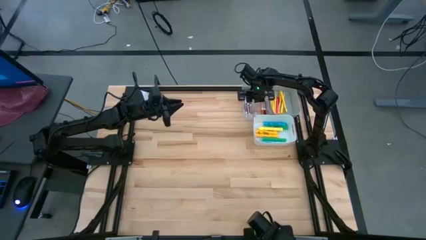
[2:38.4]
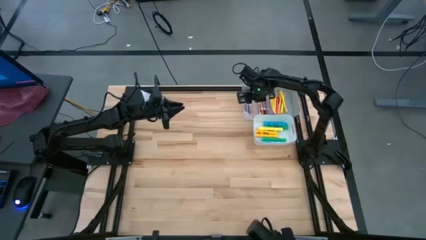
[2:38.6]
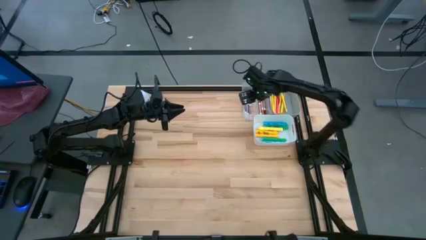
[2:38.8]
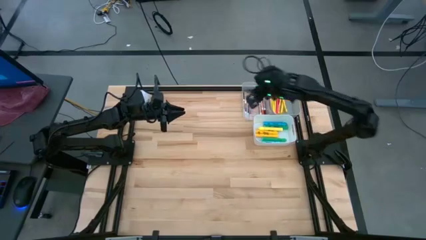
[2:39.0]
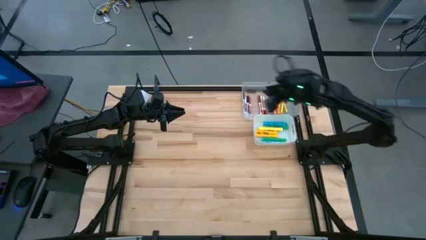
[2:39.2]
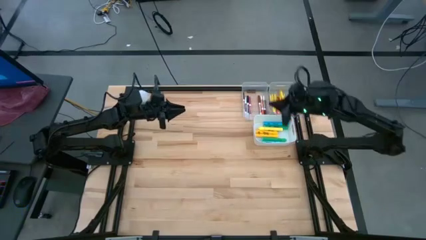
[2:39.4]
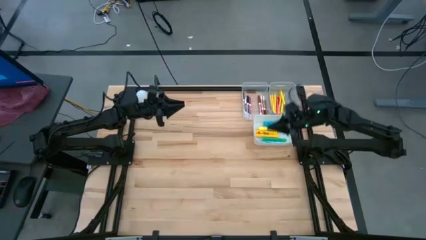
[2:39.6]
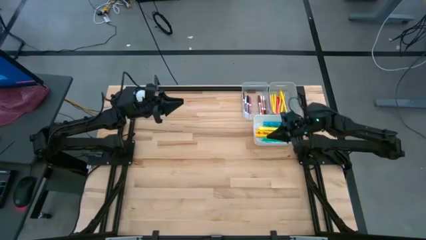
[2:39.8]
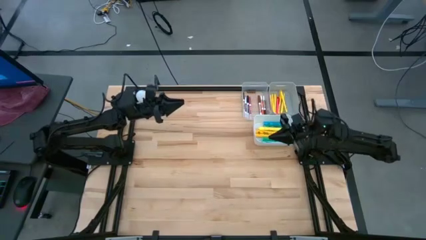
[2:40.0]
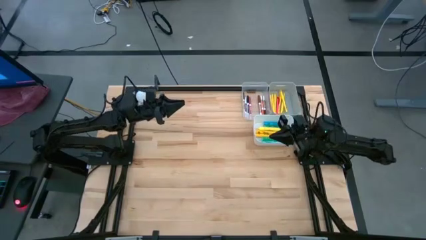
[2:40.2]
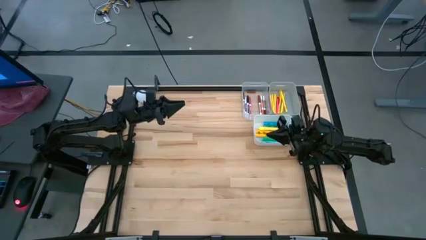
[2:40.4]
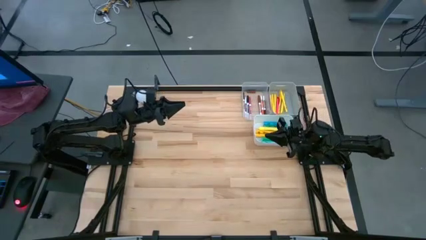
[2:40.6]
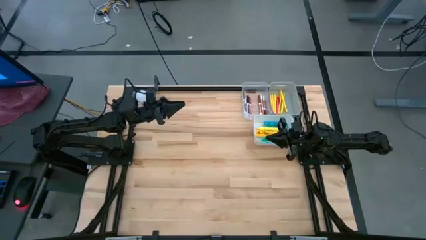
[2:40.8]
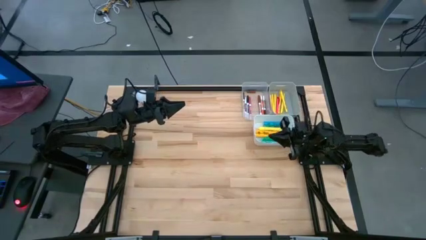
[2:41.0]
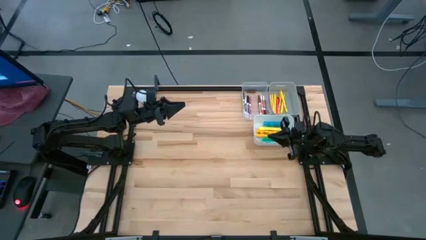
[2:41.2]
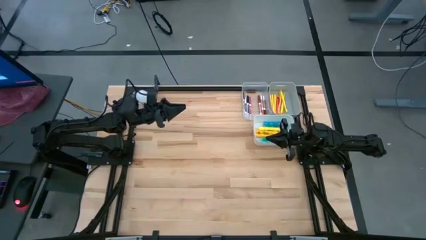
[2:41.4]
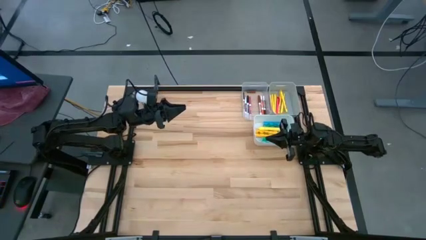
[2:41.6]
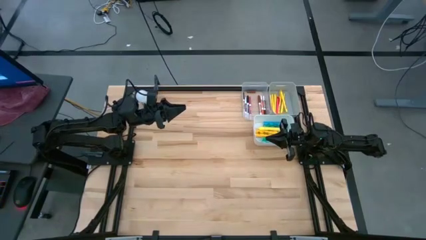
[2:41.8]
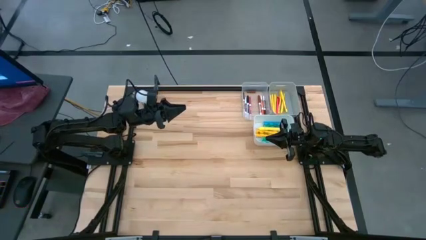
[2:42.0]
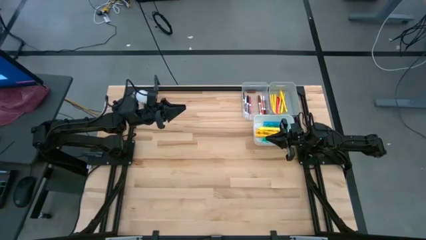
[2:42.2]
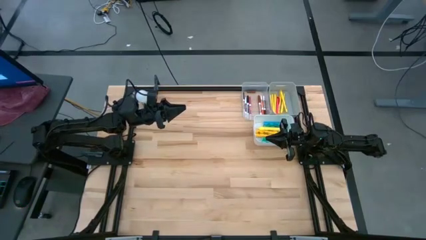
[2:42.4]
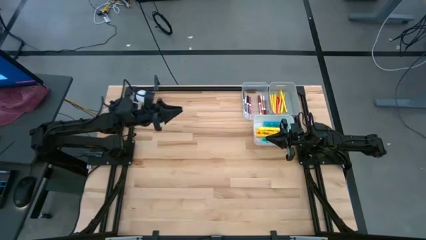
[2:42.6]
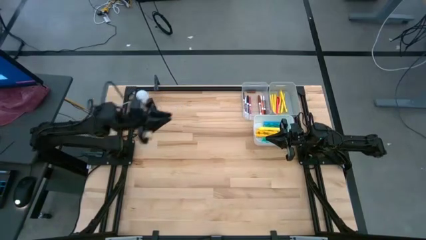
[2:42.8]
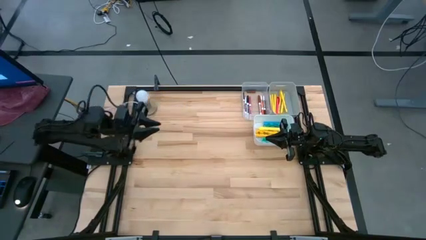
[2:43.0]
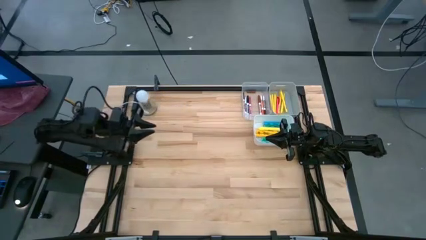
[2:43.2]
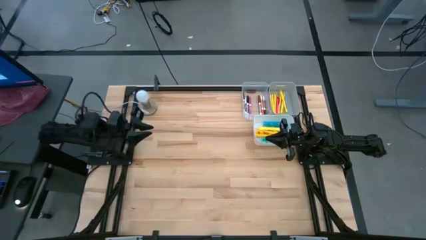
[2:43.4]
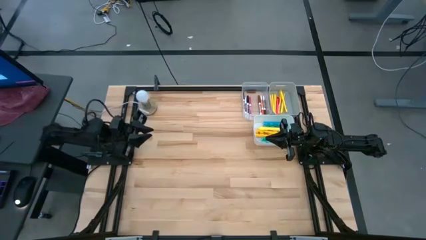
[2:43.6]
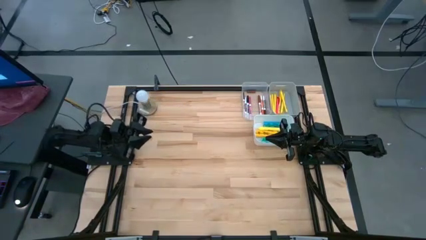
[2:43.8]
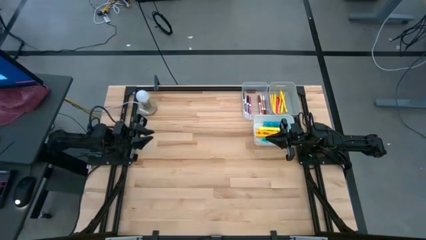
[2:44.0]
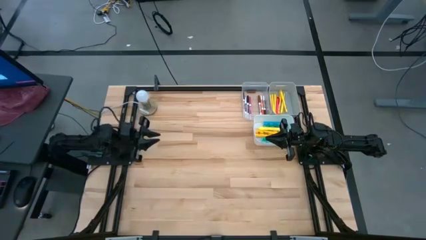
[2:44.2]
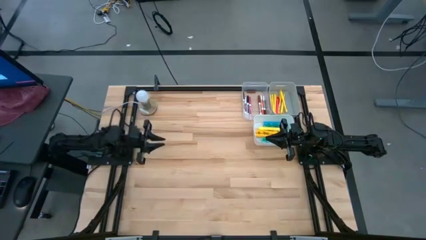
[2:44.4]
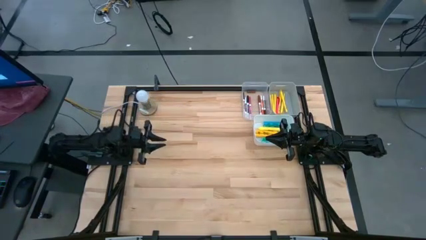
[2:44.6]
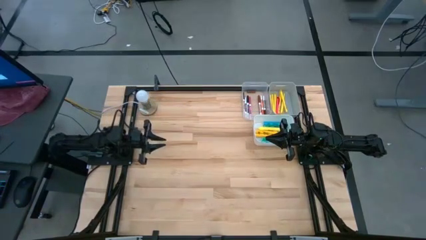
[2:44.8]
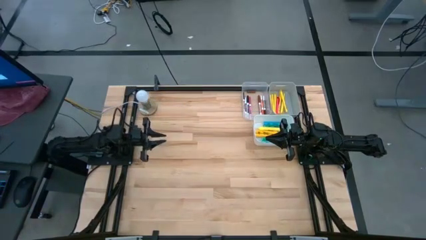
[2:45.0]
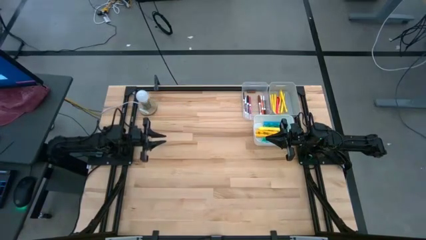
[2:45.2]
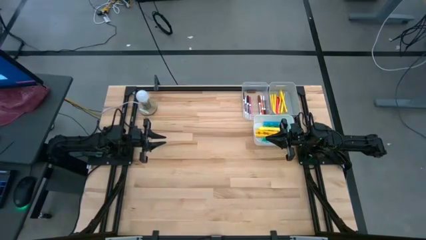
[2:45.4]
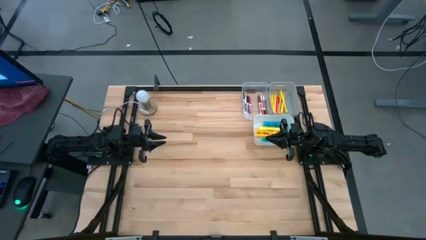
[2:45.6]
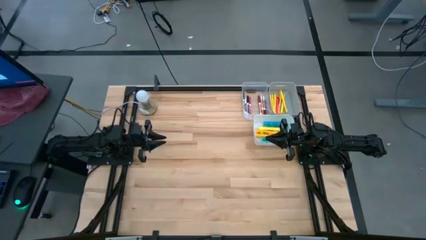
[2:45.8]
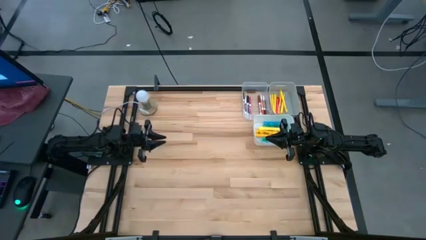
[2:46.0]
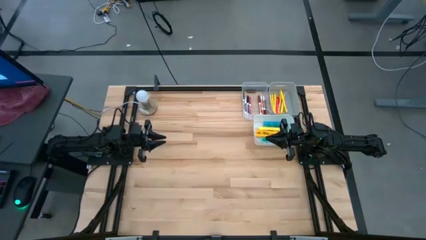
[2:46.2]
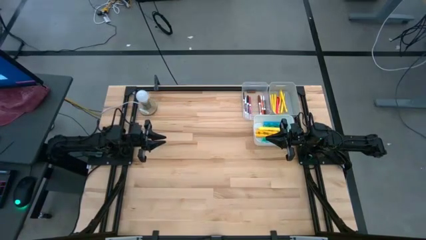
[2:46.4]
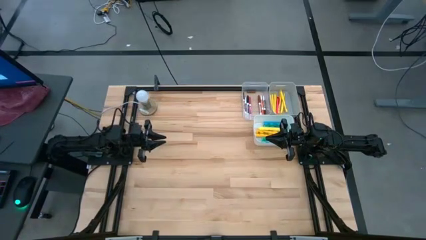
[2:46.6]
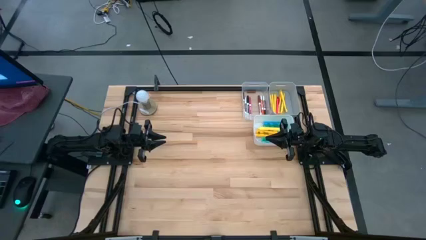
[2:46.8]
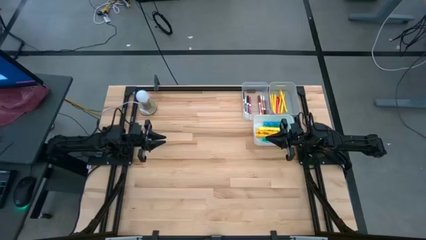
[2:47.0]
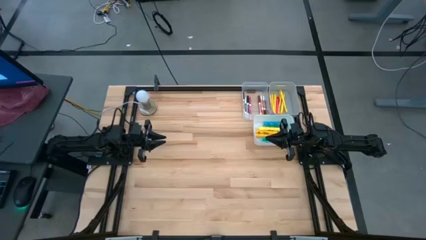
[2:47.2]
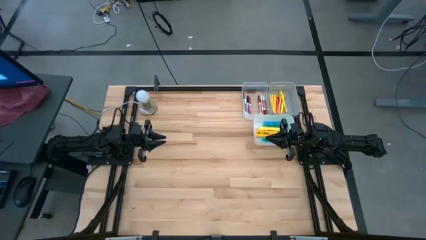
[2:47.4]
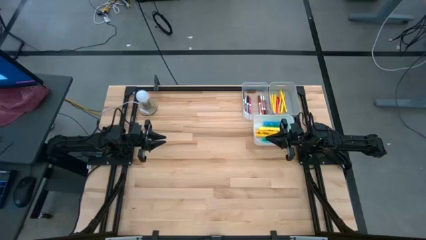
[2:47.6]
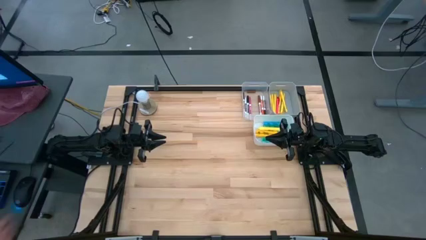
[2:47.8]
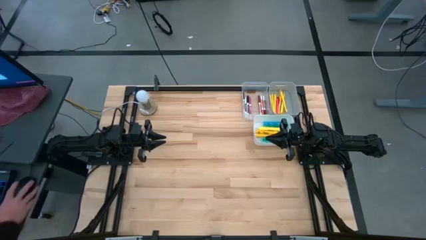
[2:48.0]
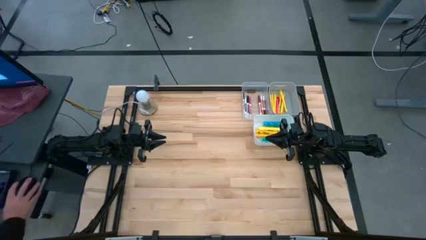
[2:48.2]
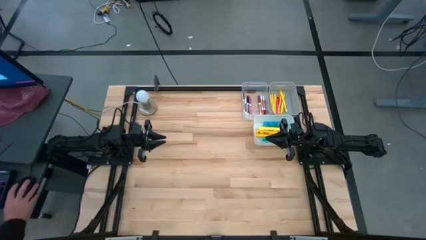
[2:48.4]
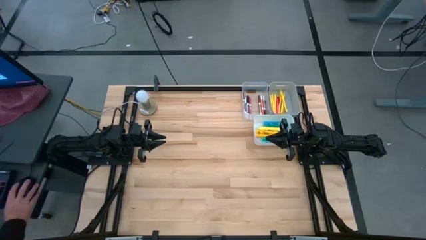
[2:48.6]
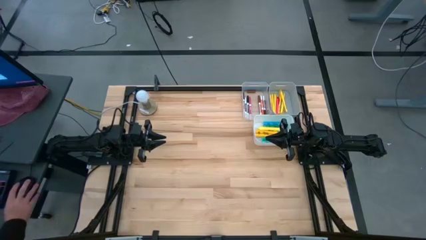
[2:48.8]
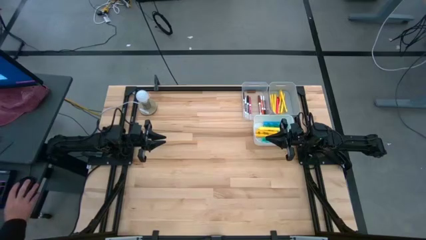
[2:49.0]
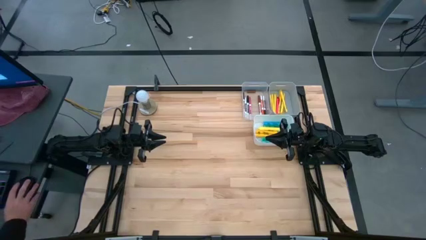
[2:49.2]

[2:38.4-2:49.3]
Task: Pick & Place Markers
Return to Home Position

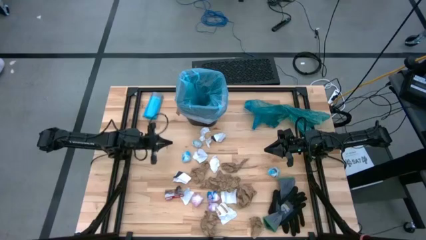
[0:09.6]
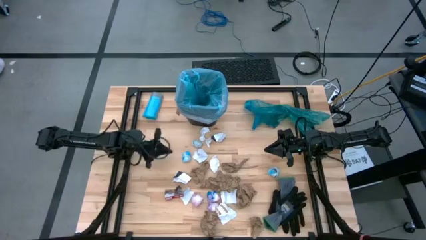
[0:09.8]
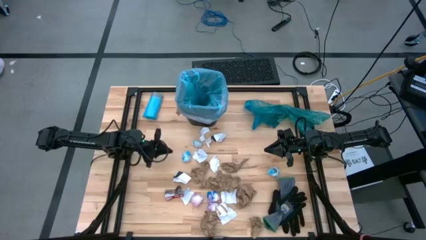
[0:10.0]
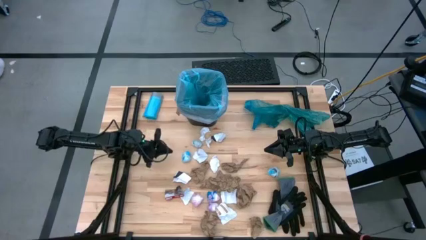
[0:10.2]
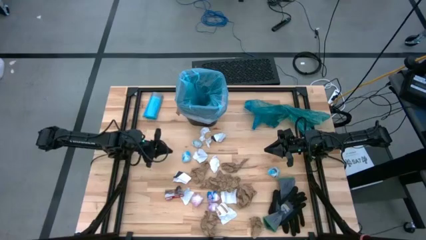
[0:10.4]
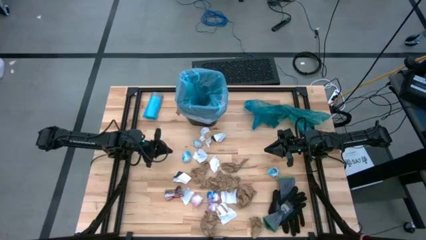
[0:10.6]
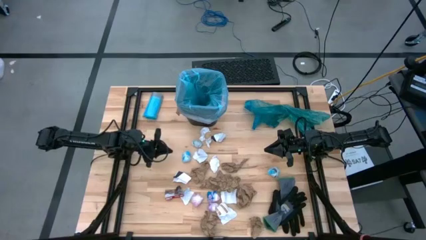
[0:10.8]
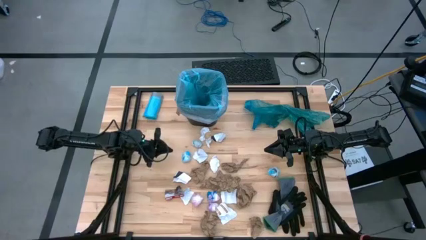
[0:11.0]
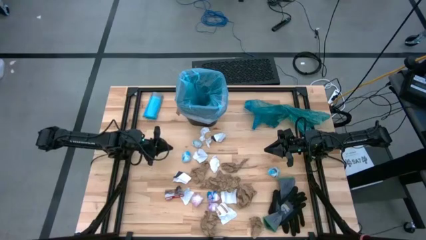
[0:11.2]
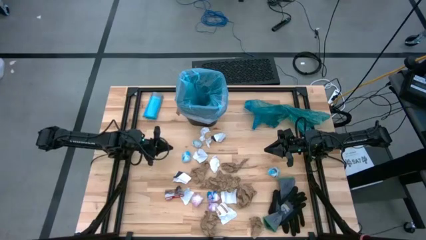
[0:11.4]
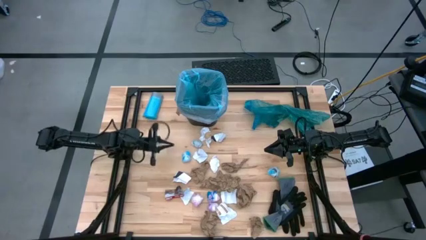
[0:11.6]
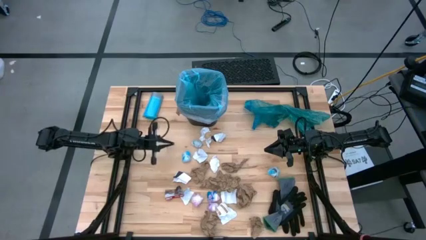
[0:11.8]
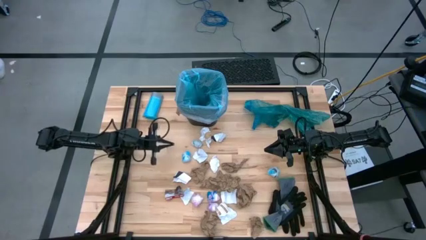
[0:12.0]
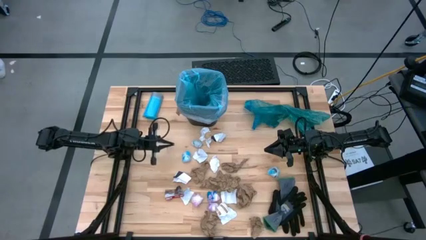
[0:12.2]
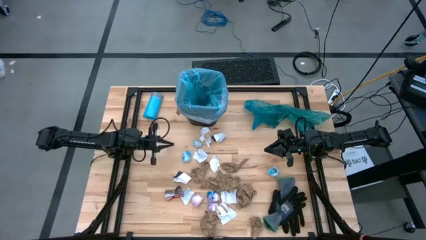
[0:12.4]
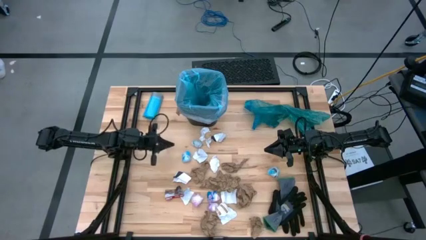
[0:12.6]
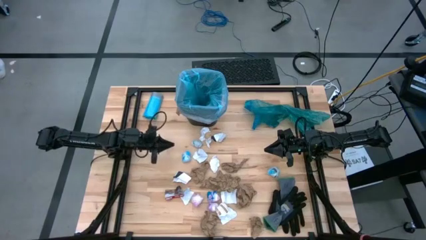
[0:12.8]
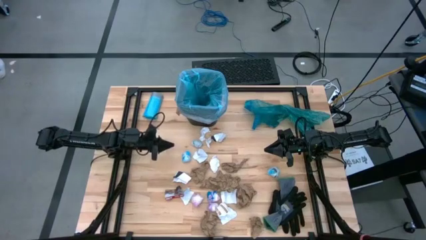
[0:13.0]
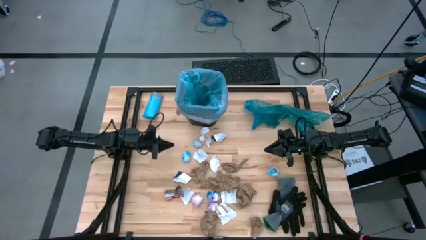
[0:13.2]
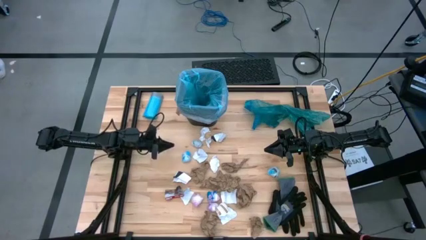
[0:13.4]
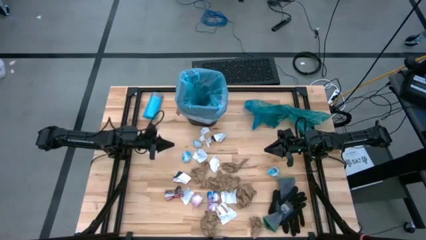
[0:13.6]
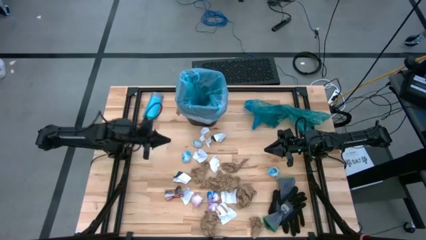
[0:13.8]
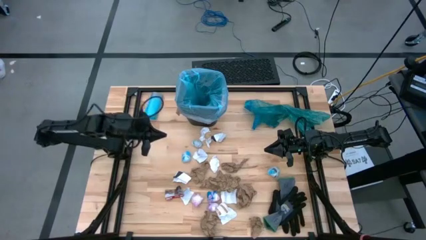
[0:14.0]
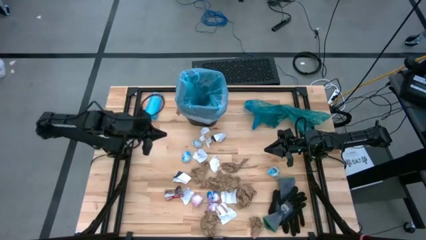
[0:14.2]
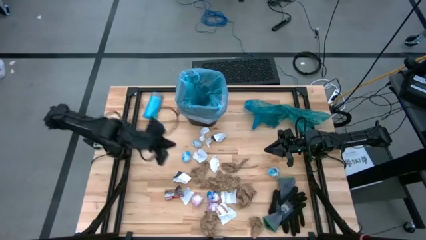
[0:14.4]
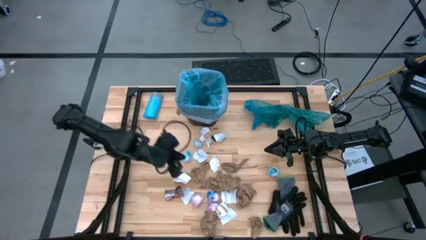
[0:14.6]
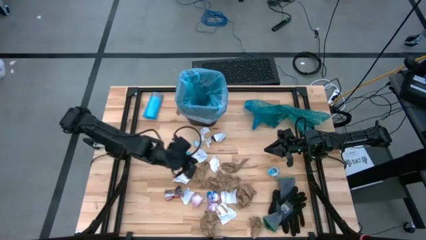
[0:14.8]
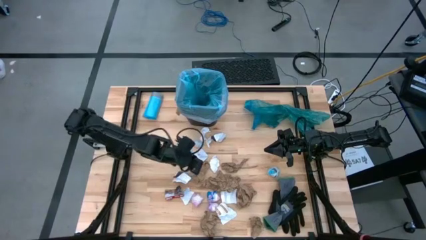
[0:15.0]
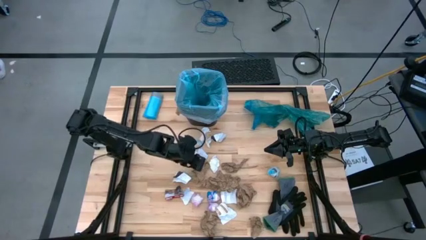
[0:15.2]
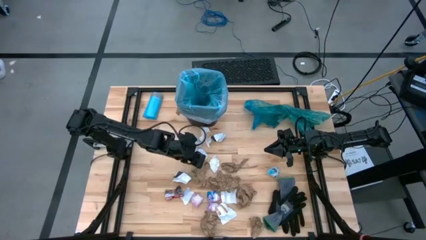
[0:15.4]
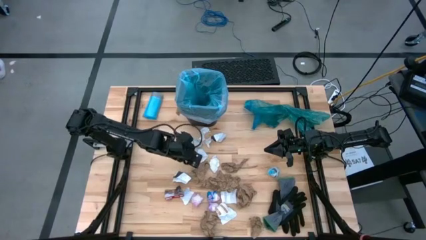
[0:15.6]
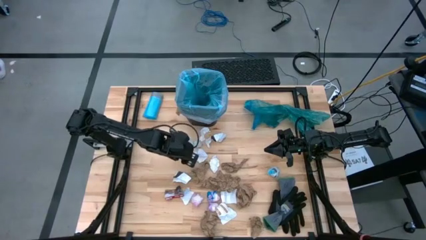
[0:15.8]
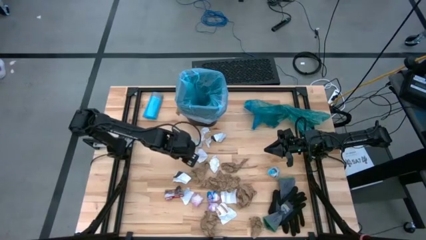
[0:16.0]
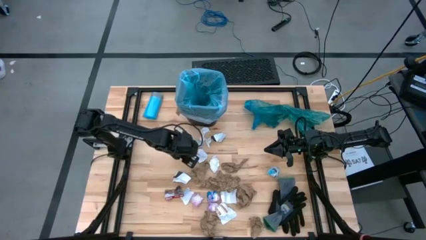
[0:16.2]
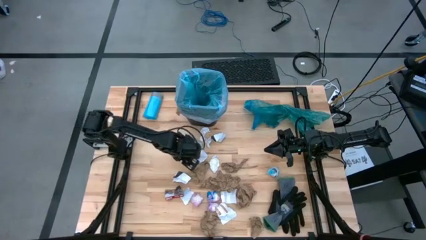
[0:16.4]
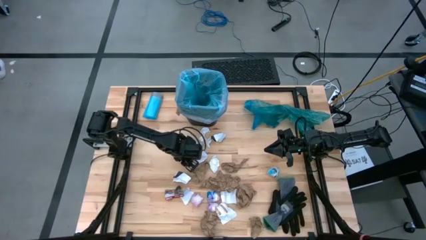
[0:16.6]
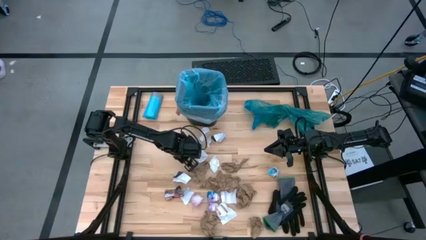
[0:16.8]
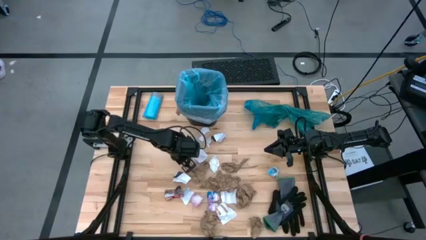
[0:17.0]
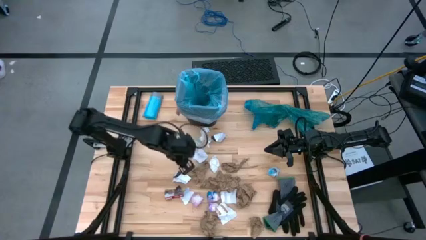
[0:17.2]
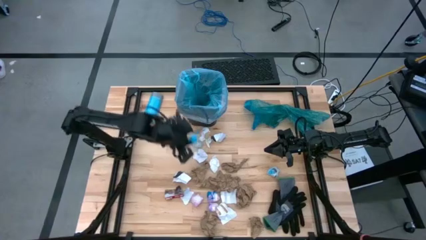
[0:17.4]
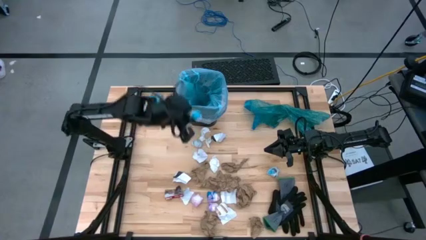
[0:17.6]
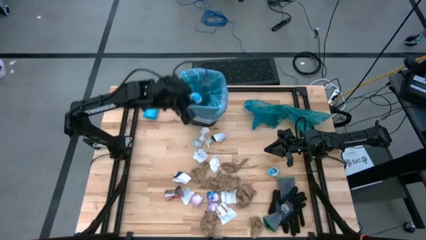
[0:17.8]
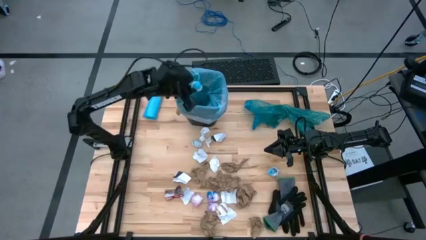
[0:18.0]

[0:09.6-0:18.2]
Task: place trash/remove bag and relplace
Put the blue plastic trash into the trash bin
